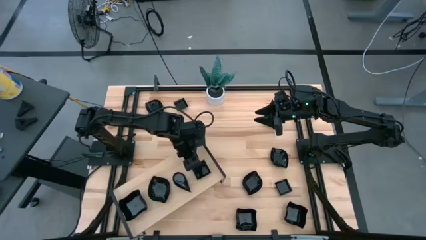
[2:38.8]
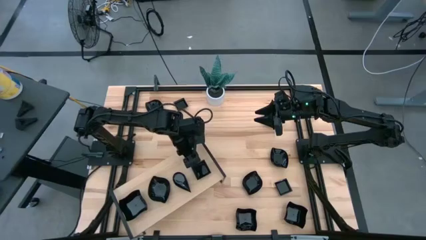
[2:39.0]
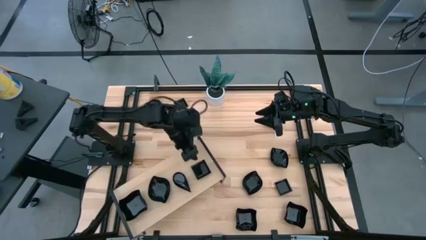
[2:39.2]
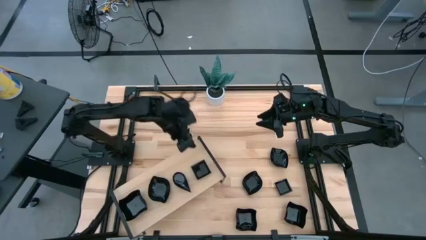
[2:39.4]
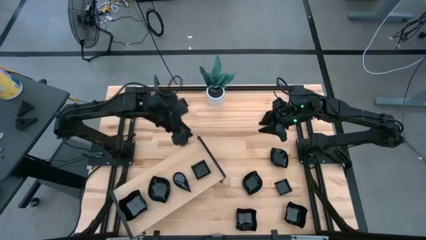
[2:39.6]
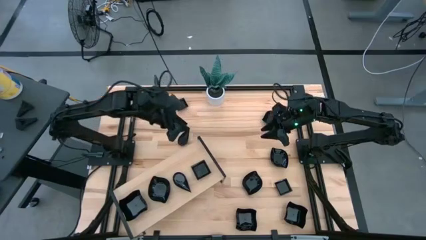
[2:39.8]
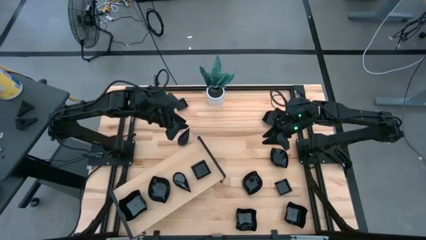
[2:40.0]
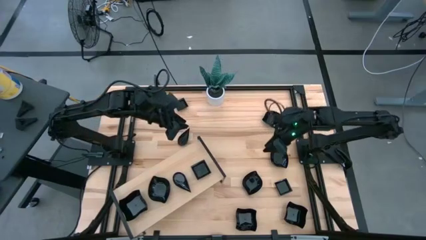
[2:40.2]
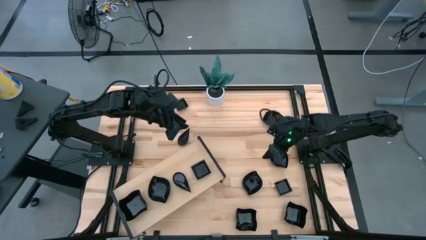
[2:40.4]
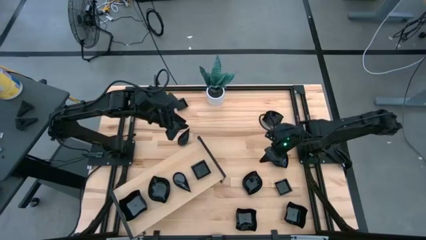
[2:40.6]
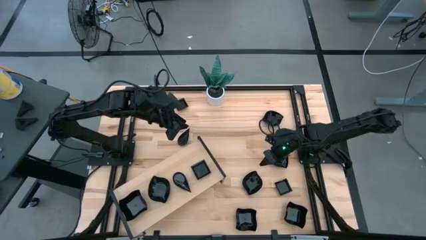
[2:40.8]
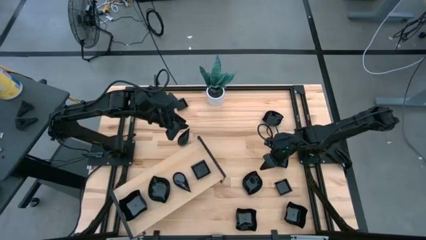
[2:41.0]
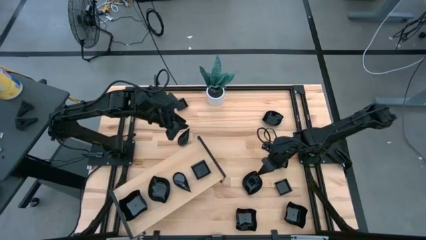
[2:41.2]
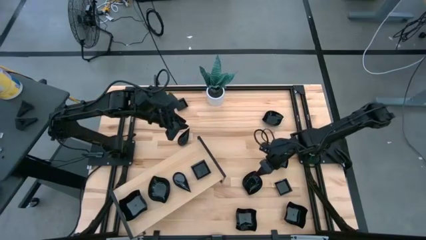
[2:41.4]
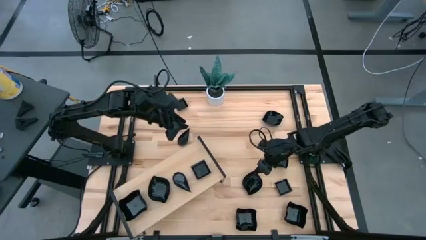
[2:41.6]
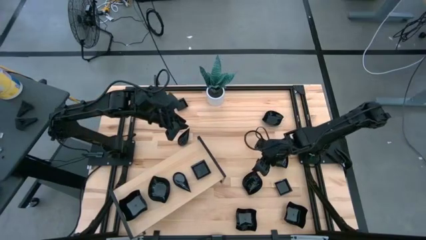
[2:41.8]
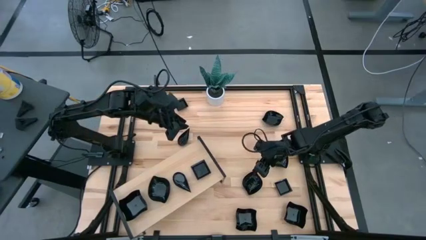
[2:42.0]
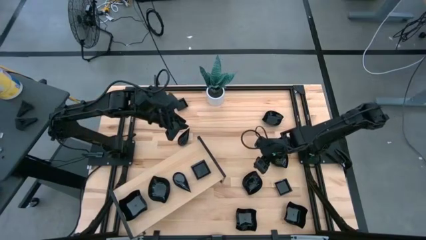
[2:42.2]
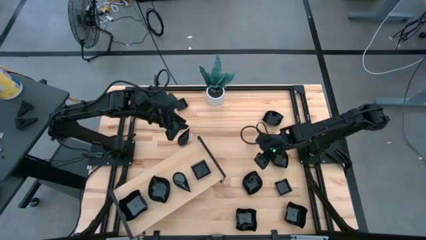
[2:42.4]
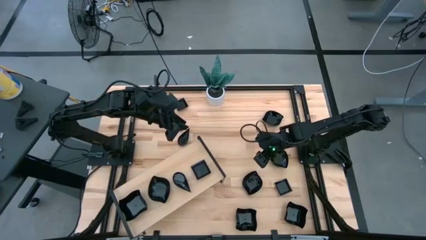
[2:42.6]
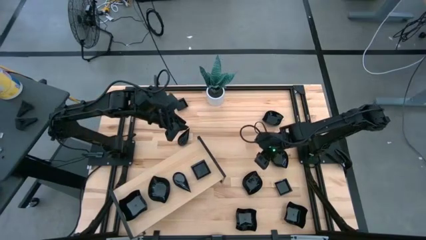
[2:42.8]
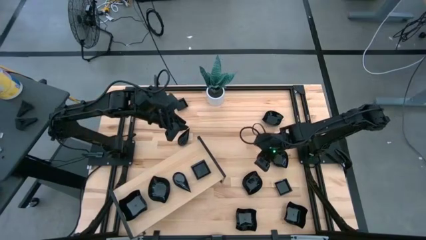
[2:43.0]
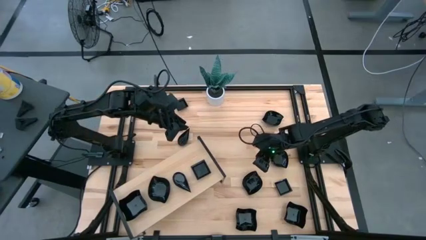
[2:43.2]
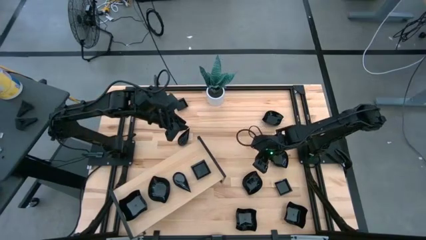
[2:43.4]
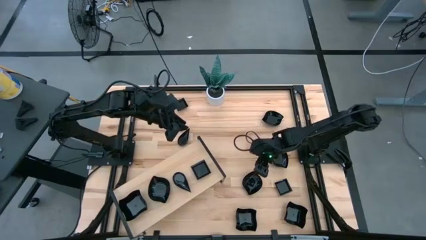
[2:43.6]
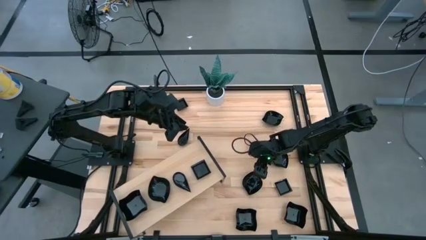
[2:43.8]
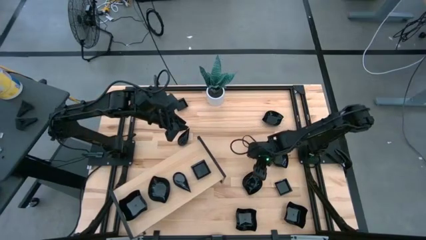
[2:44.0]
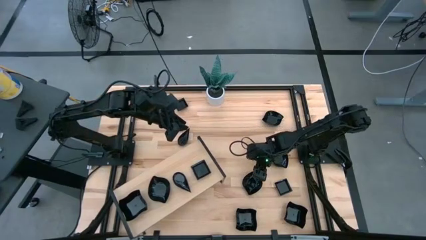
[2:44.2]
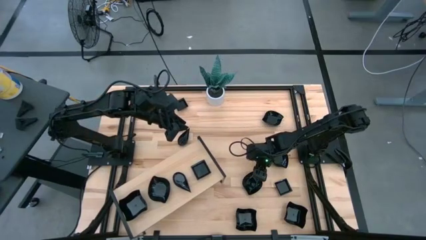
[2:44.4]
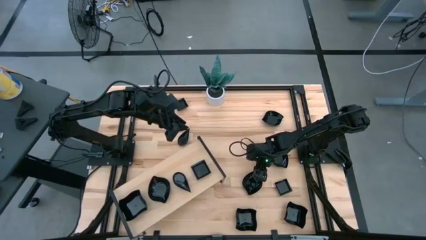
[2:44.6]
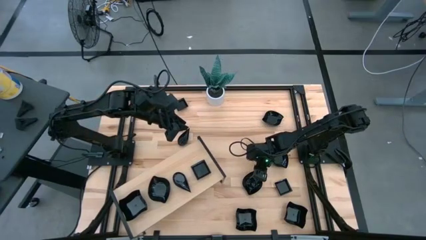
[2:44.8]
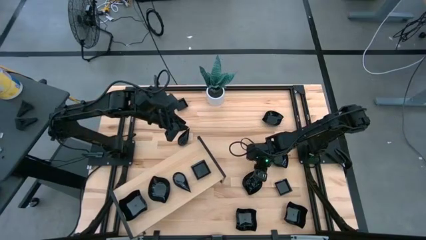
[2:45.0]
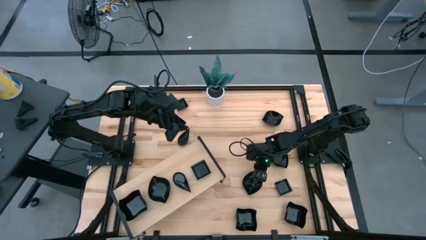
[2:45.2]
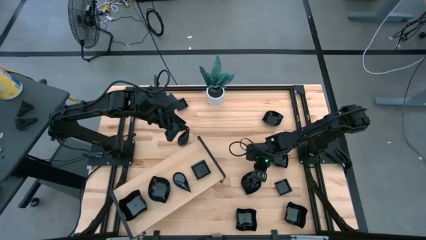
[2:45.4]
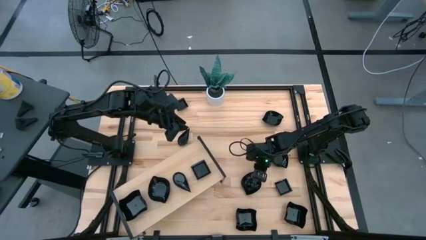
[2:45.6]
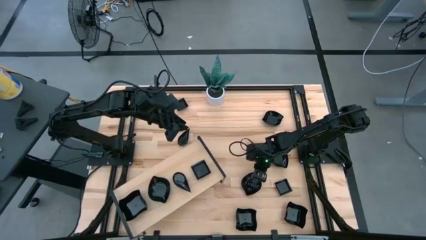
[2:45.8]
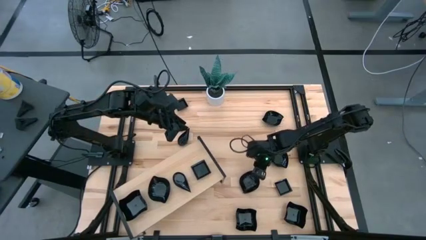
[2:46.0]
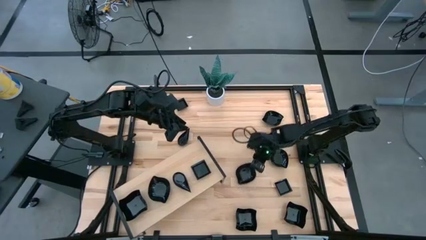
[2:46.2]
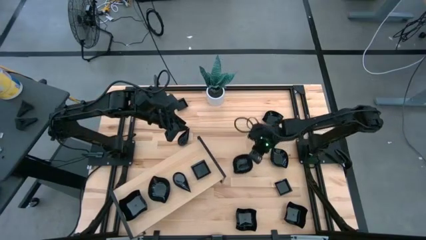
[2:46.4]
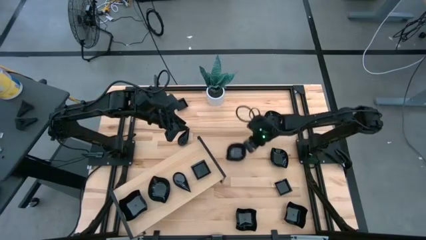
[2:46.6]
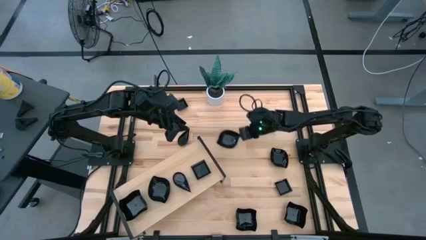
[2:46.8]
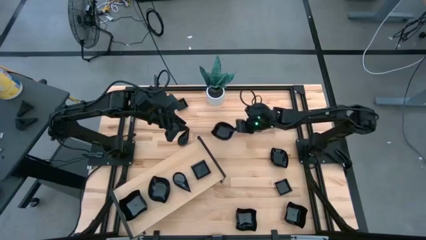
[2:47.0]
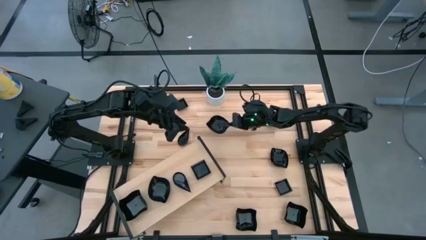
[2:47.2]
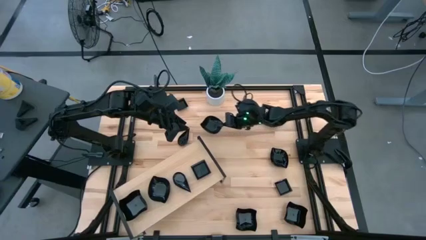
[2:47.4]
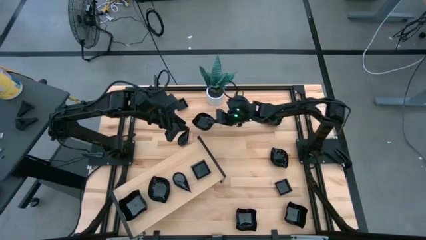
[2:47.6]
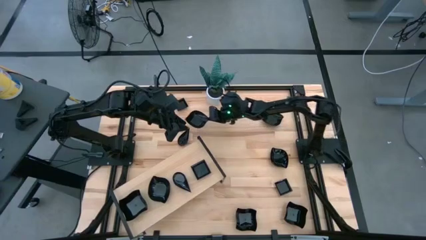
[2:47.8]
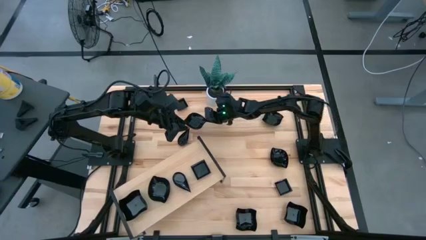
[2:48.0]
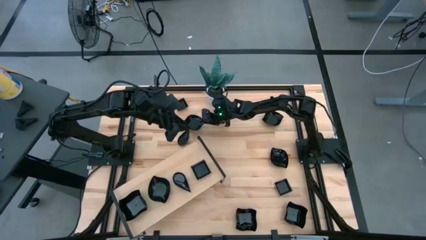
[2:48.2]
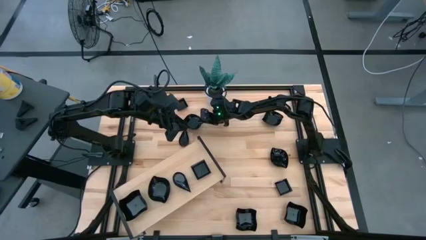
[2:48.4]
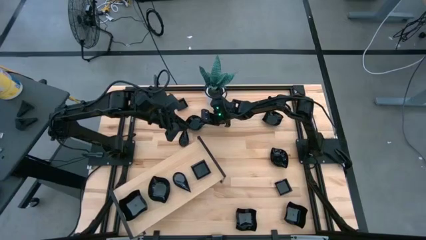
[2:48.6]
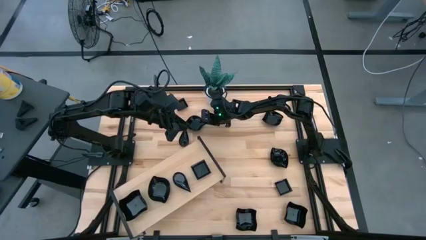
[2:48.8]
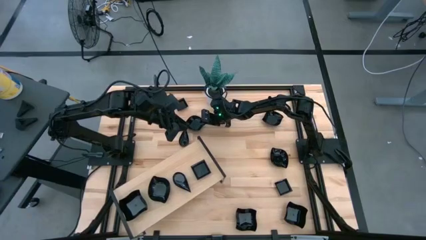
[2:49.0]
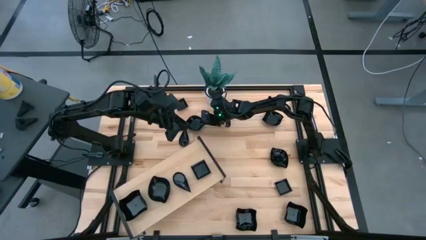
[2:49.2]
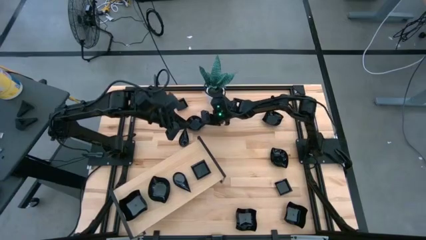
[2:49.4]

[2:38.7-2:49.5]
Task: Pick & Place Mini shaped plates
Move the black leaf shaped plate to the middle left of the table

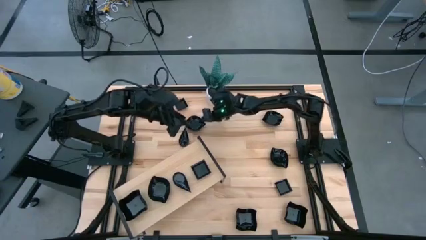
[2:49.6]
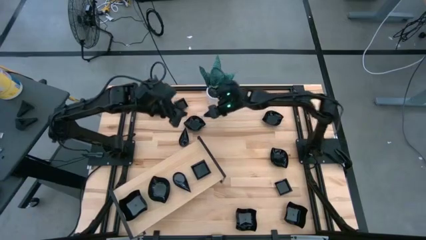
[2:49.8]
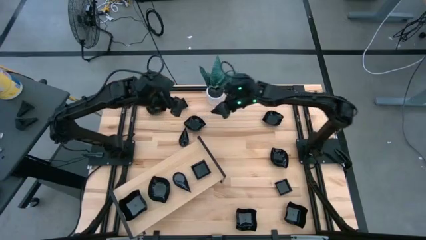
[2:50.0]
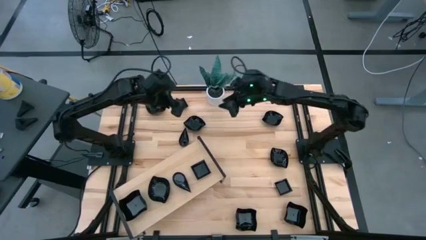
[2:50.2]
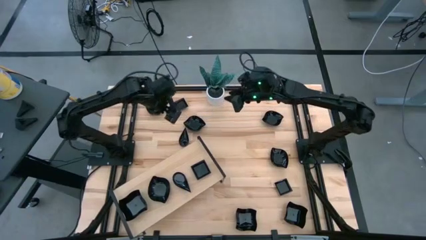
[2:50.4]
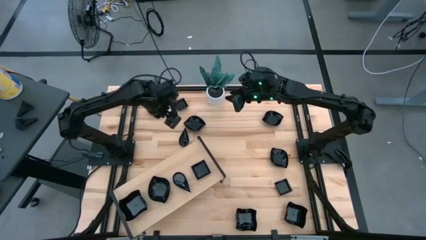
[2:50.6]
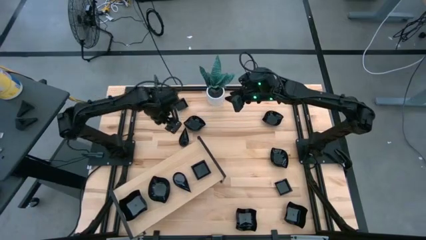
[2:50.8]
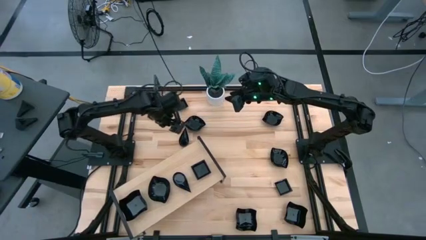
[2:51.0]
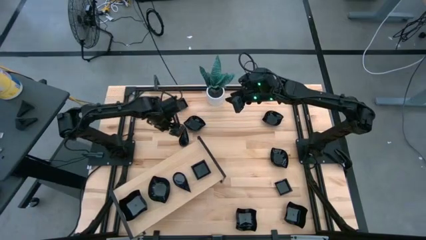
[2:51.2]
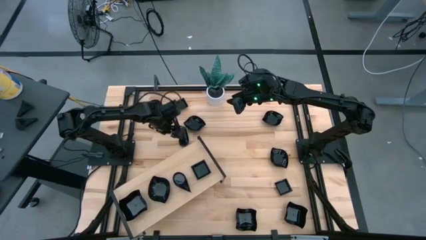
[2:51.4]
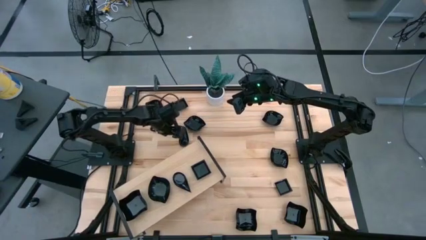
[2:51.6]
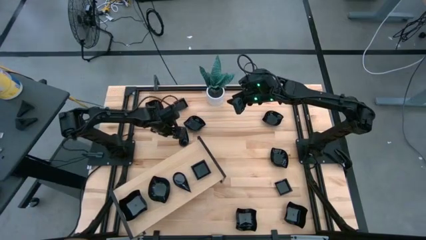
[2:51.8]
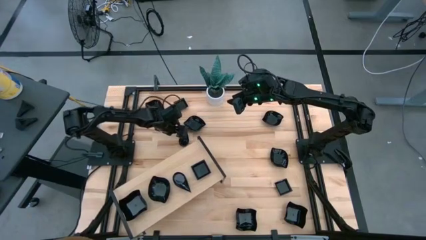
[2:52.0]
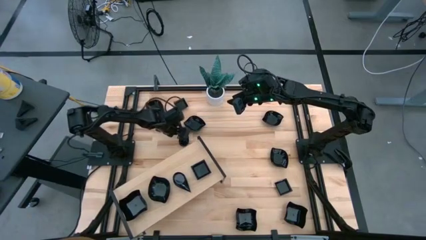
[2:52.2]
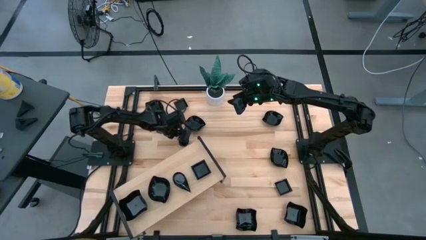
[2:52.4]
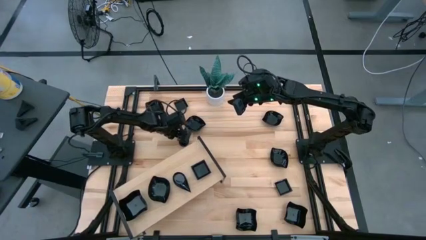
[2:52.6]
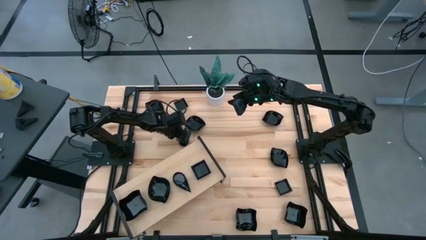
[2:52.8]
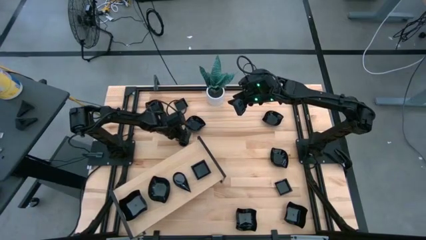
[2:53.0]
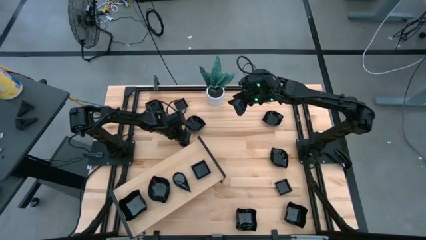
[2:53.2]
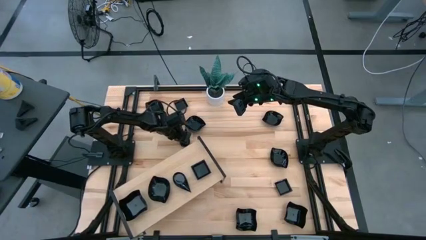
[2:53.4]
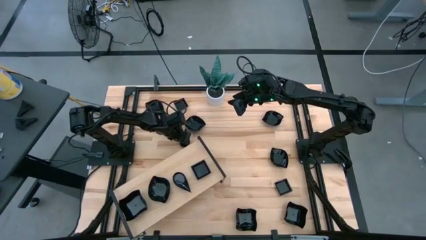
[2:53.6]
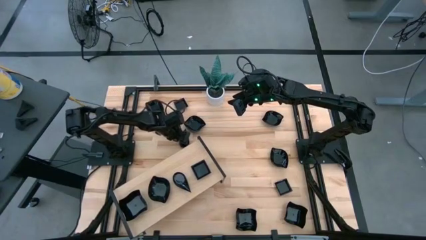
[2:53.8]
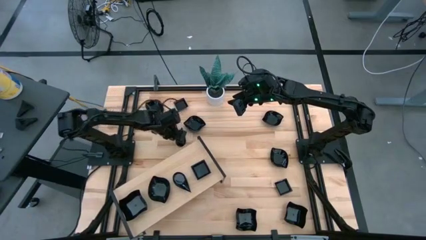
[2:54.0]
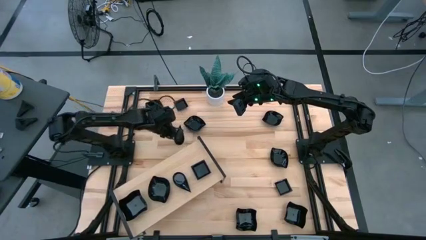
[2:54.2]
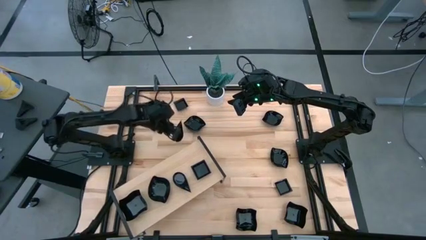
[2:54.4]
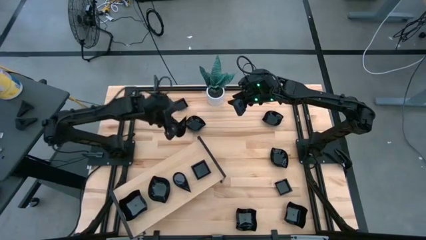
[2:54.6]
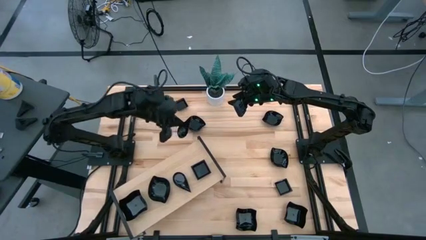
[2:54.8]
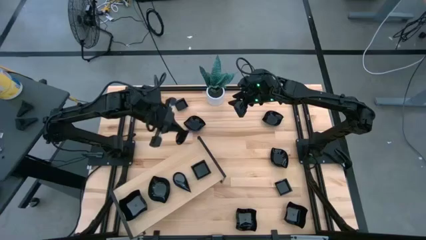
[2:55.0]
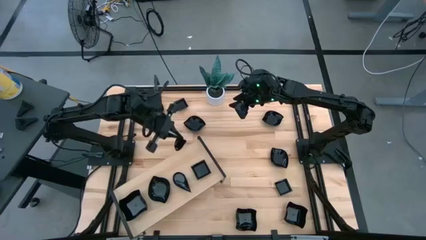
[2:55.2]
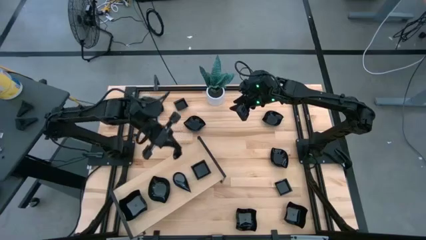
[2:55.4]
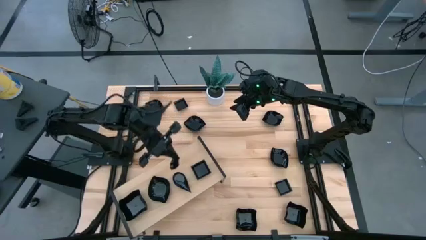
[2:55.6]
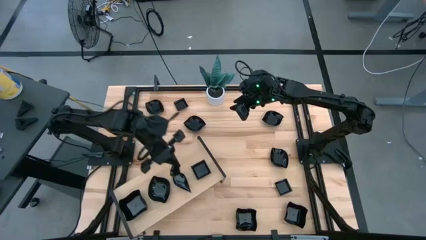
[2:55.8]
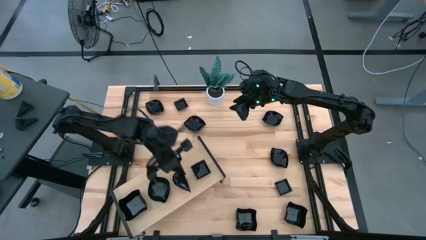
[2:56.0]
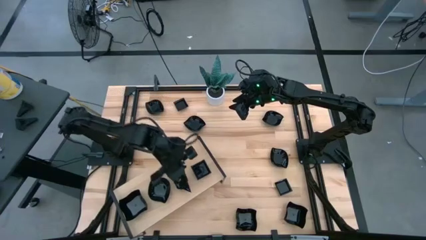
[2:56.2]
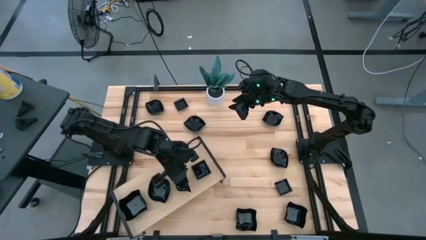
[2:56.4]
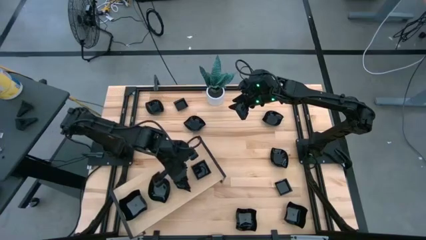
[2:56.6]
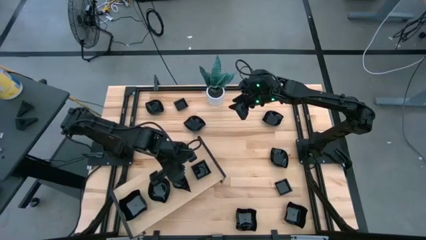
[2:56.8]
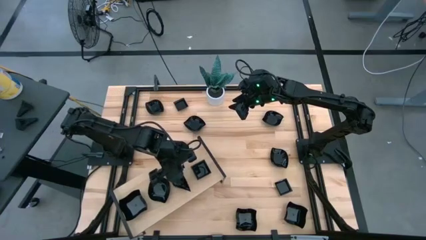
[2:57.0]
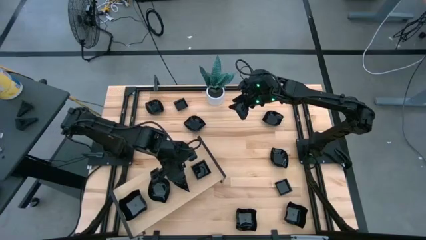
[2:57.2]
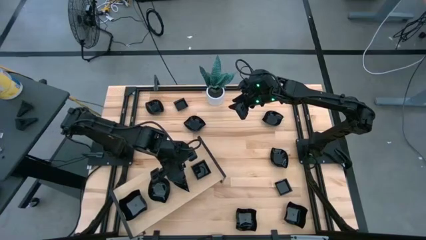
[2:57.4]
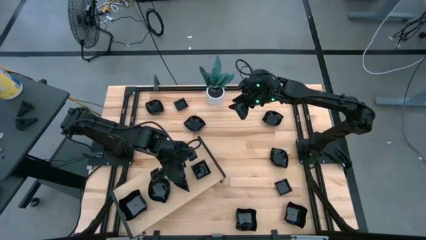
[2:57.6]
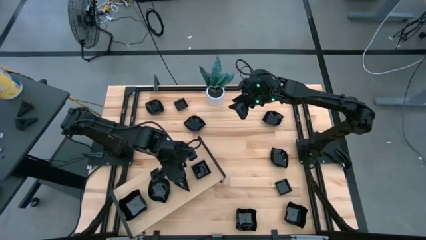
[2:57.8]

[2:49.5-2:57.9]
Stack the black drop shaped plate on top of the black drop shaped plate on the shelf
